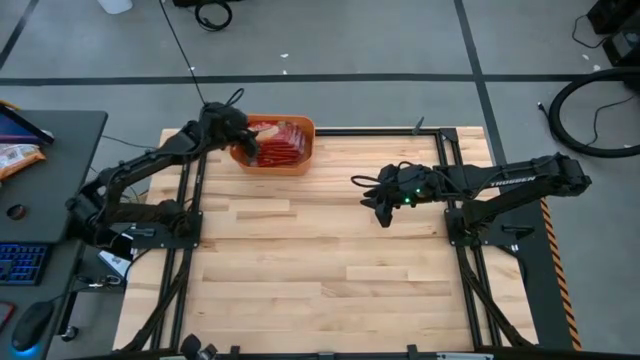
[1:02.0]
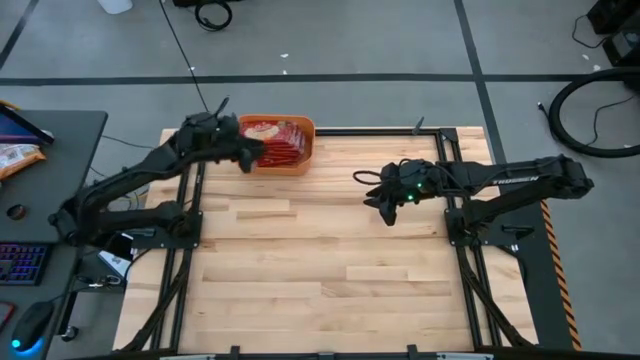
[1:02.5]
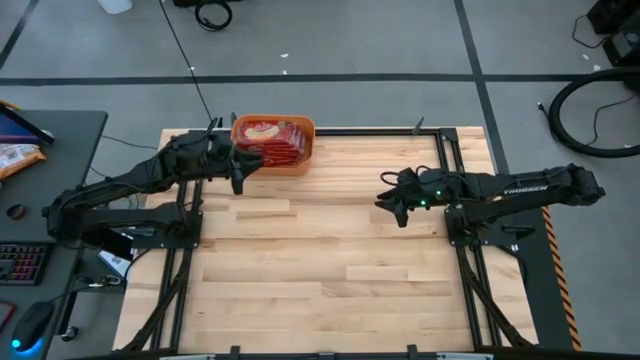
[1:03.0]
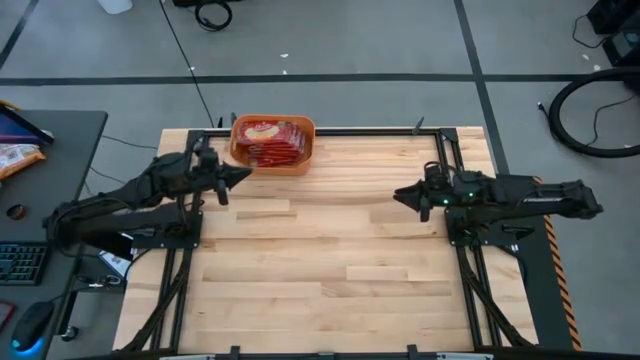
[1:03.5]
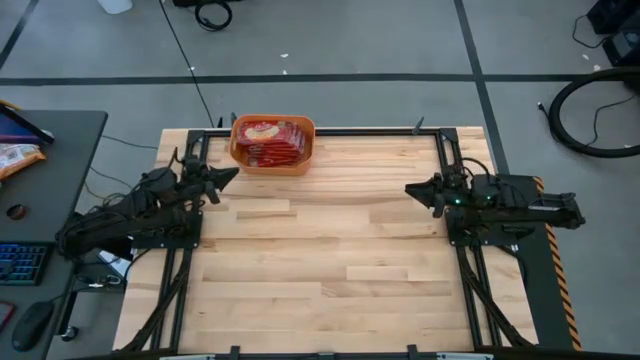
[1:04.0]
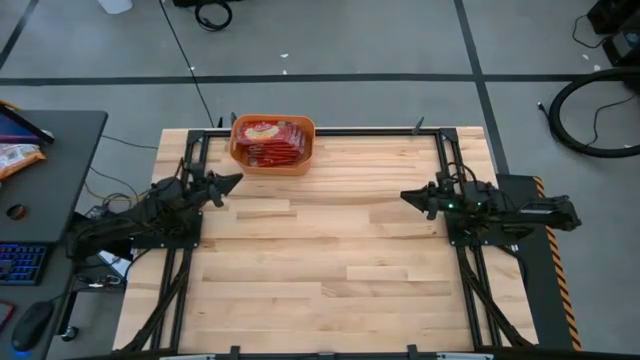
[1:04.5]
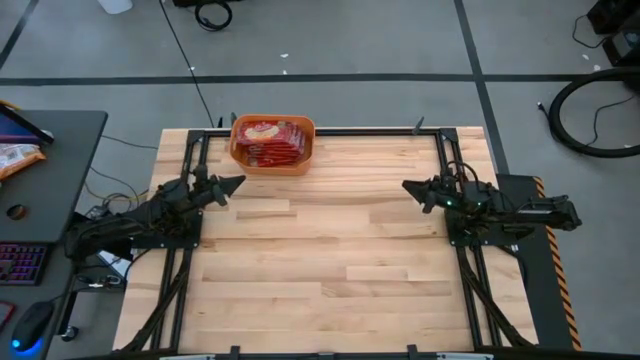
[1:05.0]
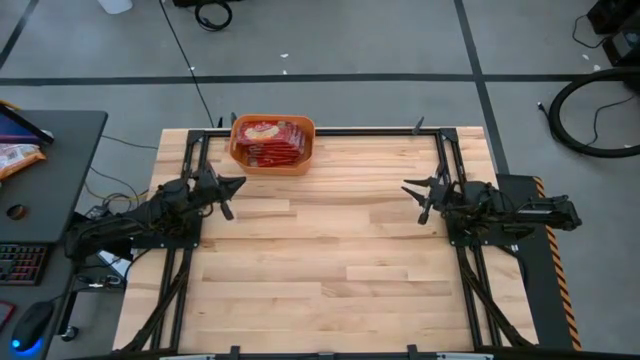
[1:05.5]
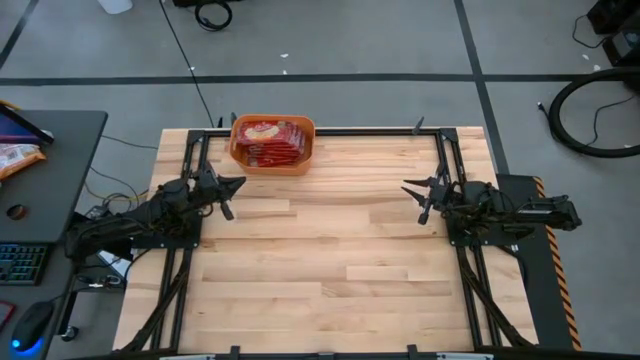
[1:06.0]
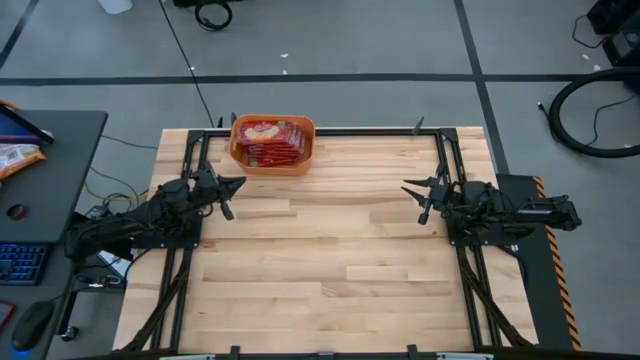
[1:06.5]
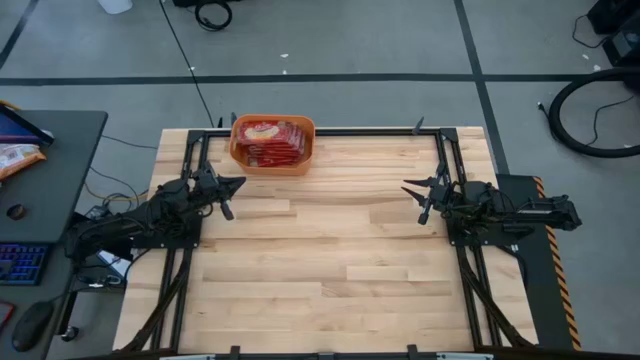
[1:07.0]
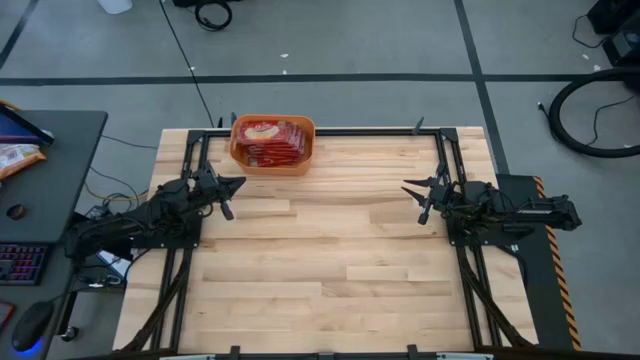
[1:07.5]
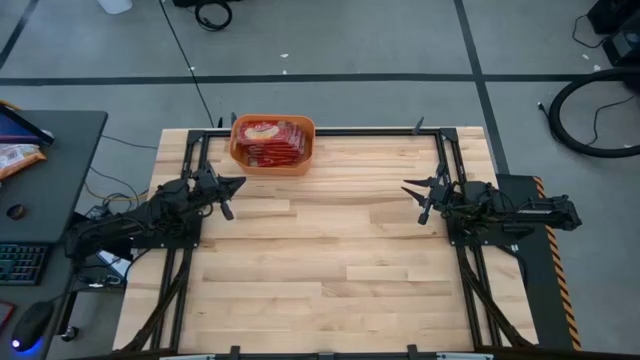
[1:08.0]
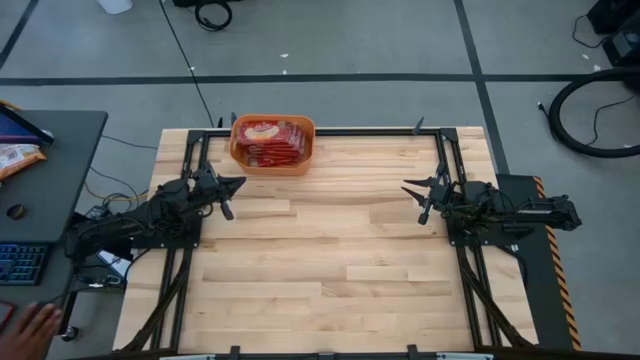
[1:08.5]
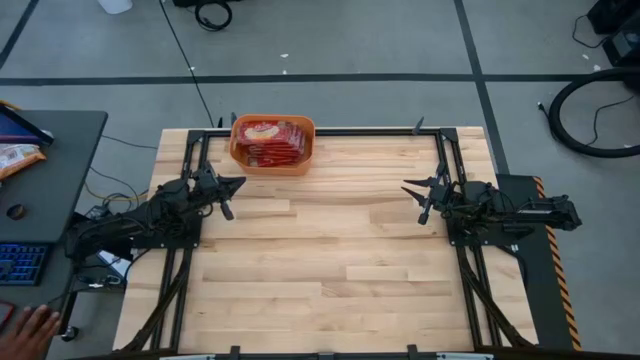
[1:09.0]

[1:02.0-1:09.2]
Task: Sort popcorn bags into baskets
Return to Home Position

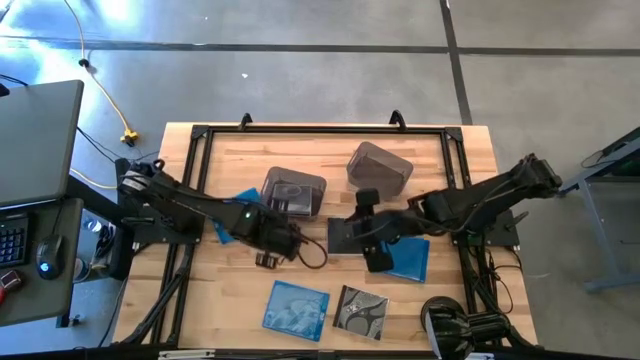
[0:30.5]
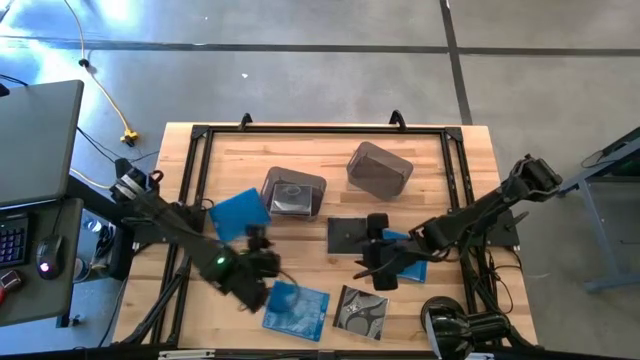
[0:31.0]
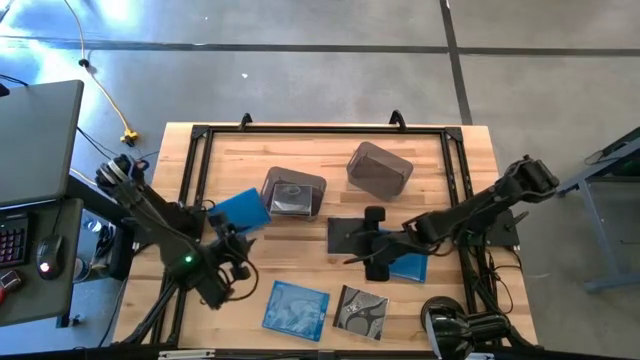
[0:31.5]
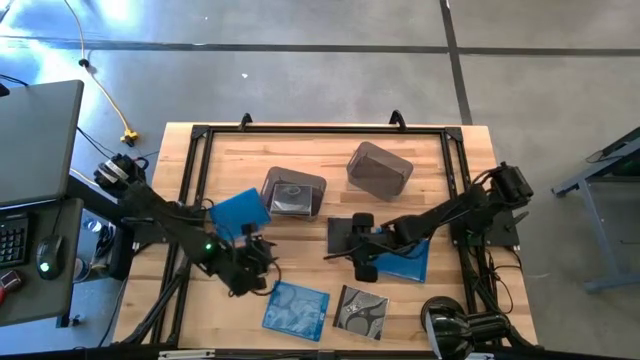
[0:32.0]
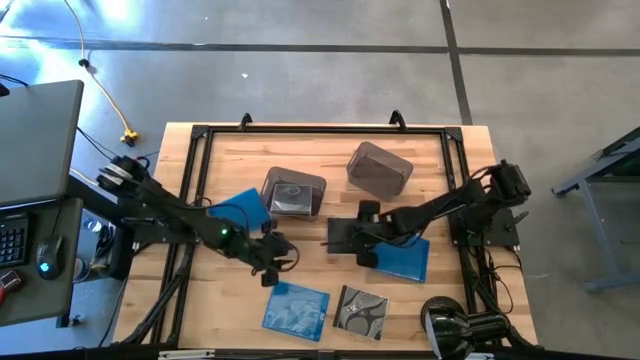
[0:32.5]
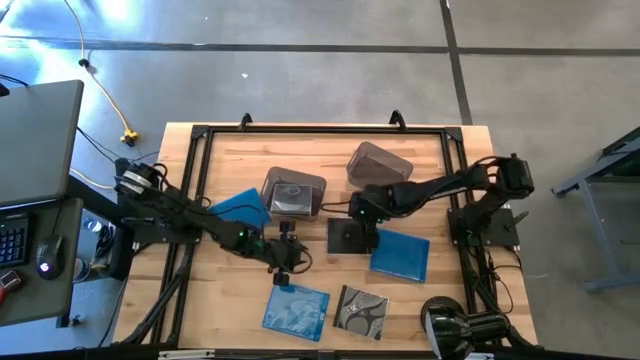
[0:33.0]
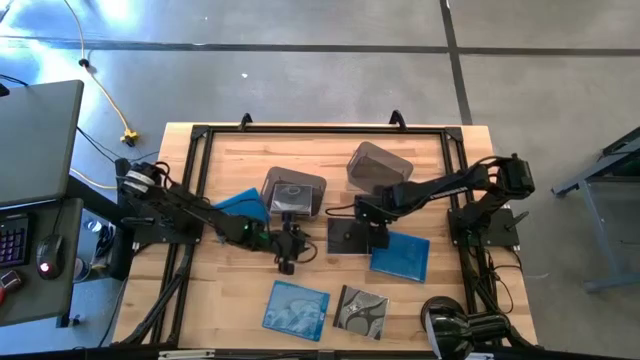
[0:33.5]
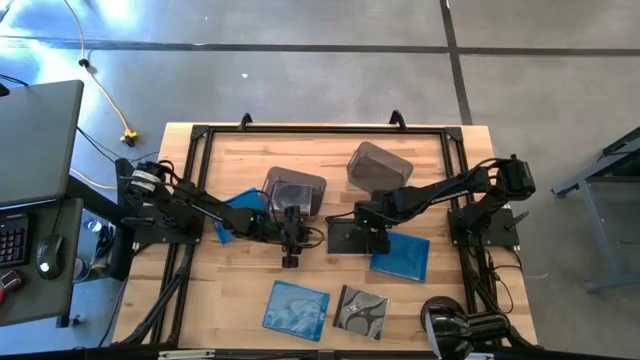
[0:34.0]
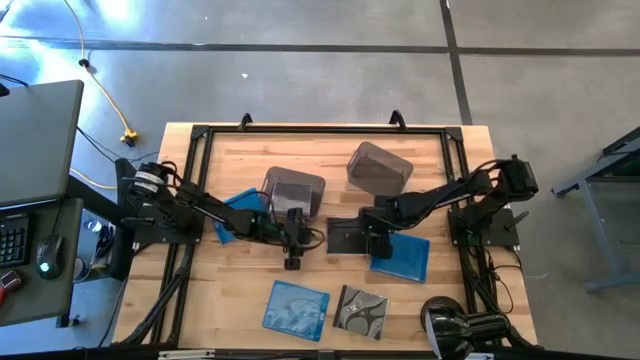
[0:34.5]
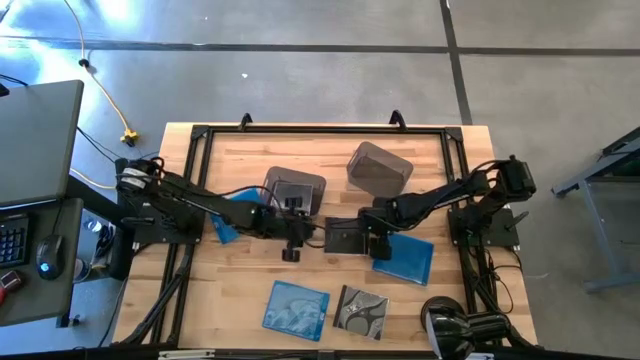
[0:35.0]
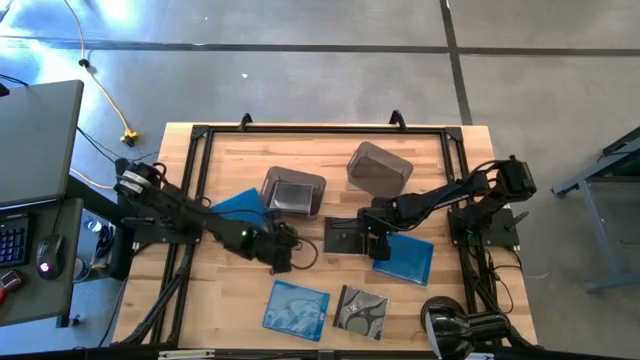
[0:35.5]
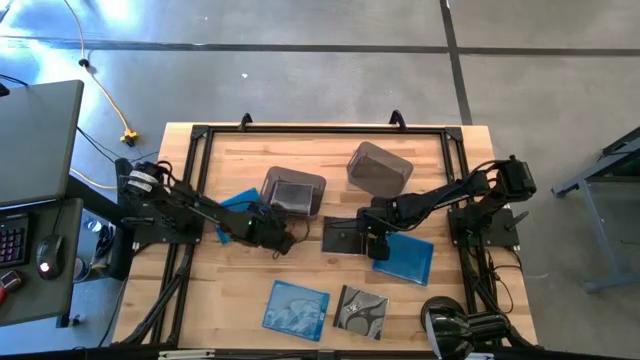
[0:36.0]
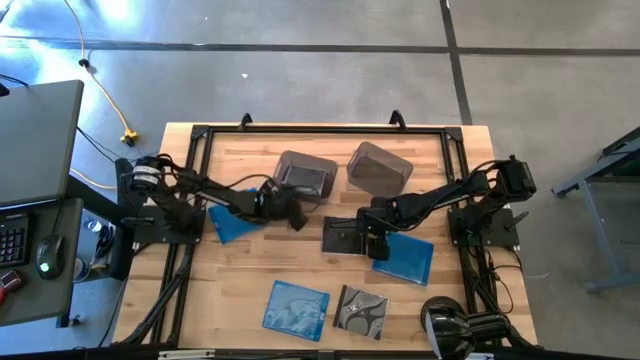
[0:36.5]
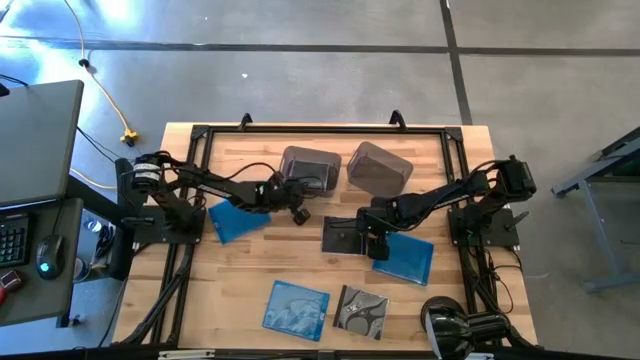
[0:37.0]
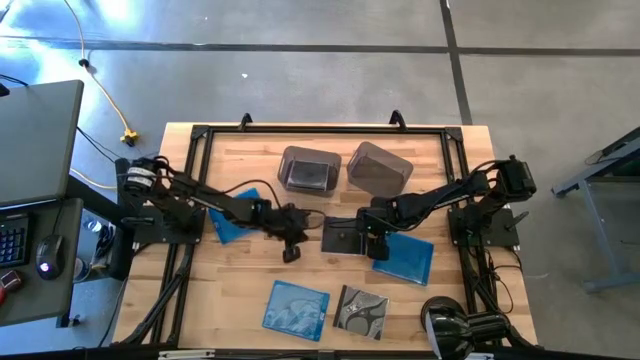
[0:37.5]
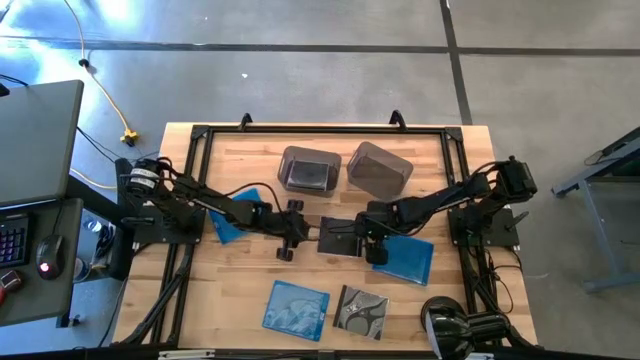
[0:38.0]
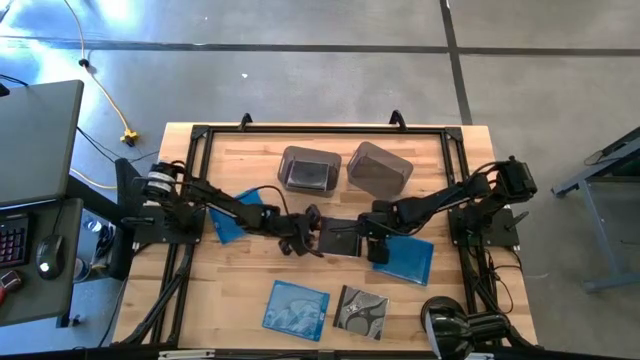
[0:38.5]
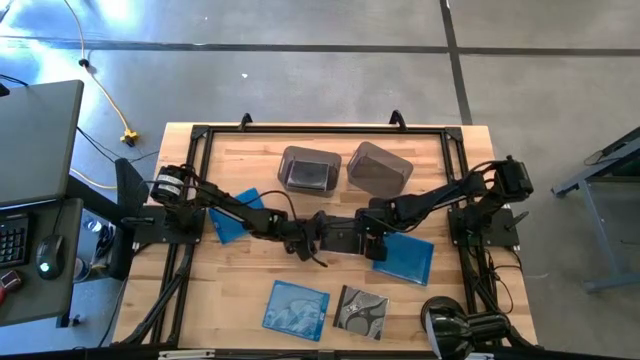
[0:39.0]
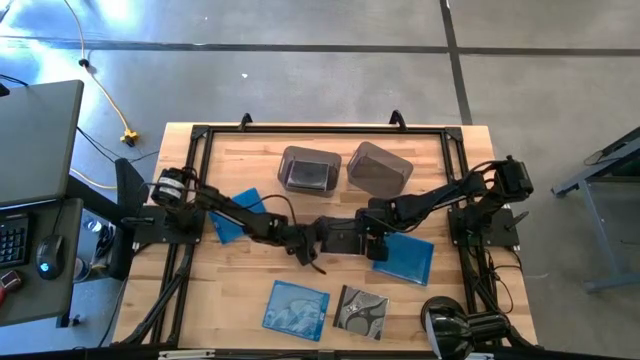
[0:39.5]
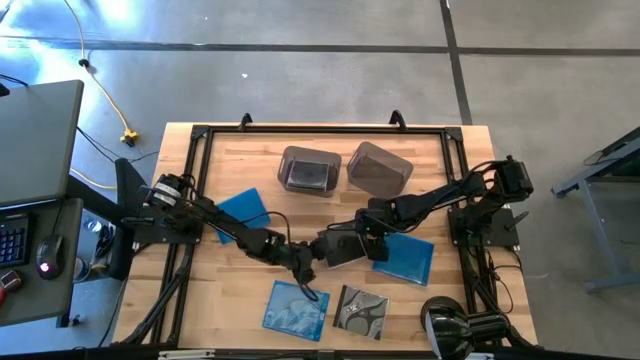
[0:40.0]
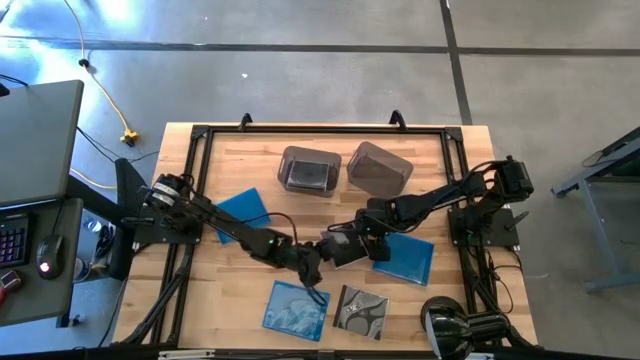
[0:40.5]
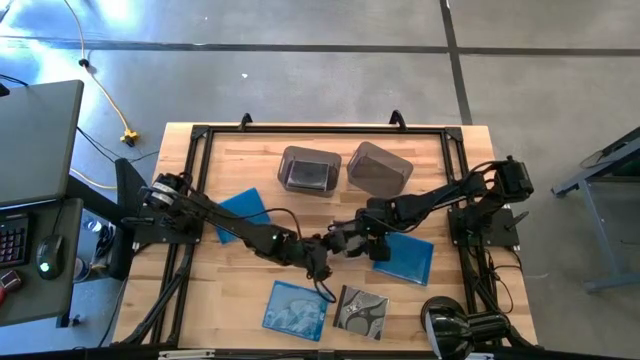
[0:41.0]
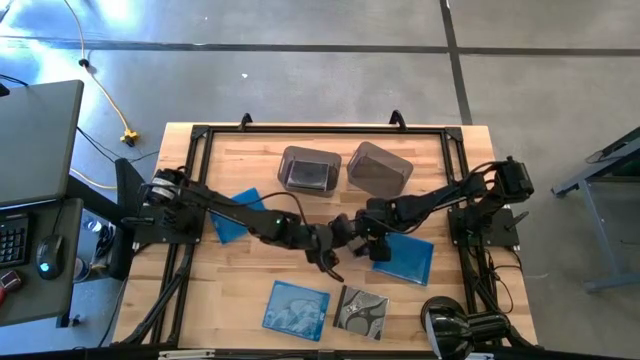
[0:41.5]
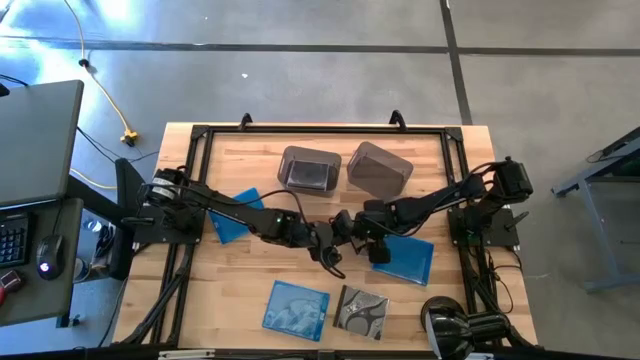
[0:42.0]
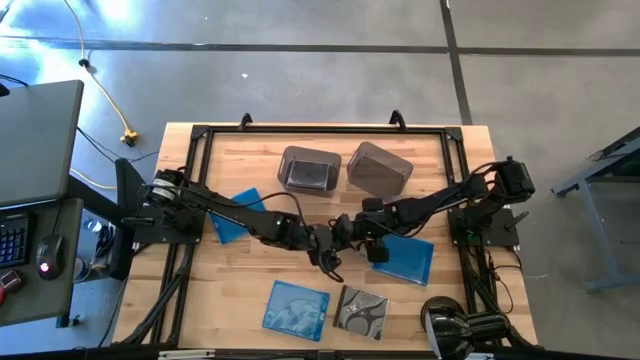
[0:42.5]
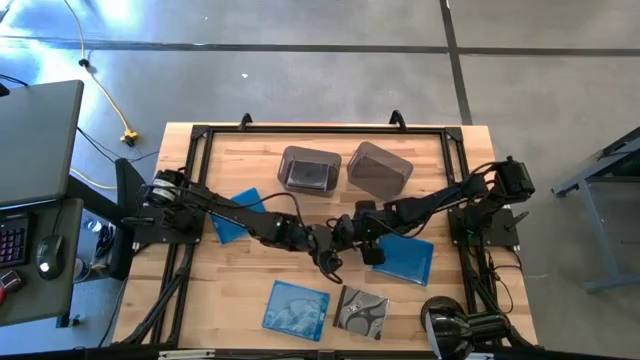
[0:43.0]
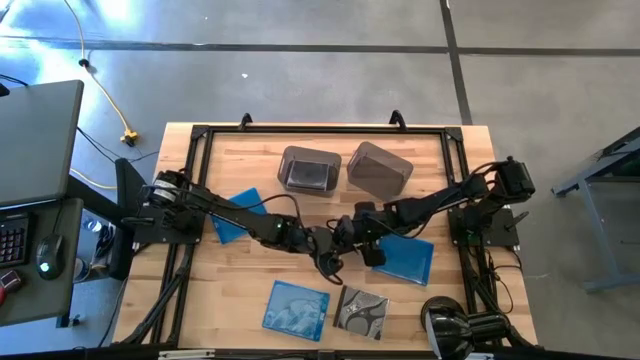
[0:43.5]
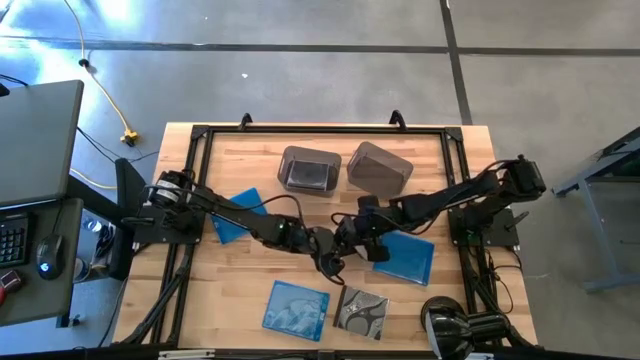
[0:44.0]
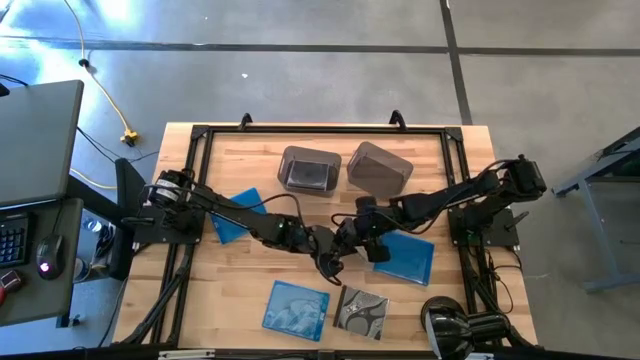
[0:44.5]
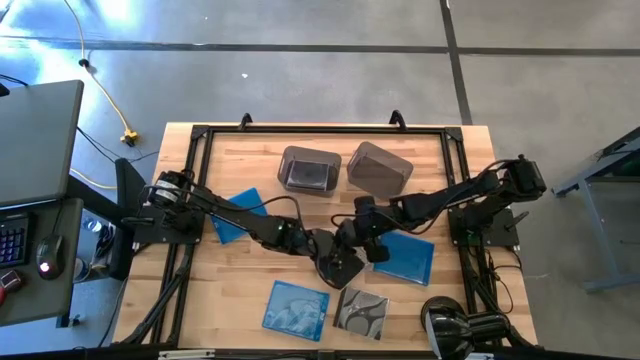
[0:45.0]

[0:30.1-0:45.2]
Task: Pick & place jewel cases by type
Put the top black CD case into the left black bin
